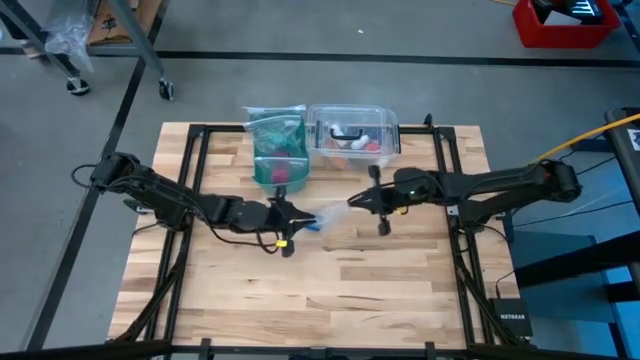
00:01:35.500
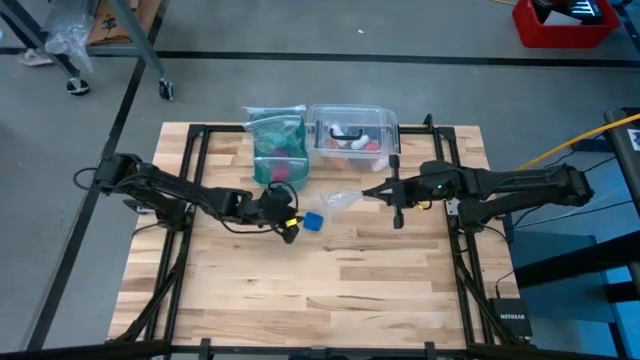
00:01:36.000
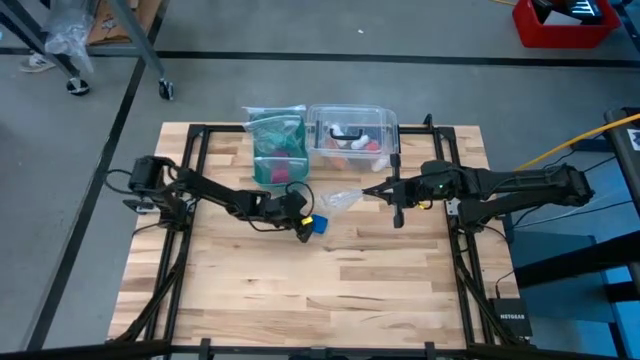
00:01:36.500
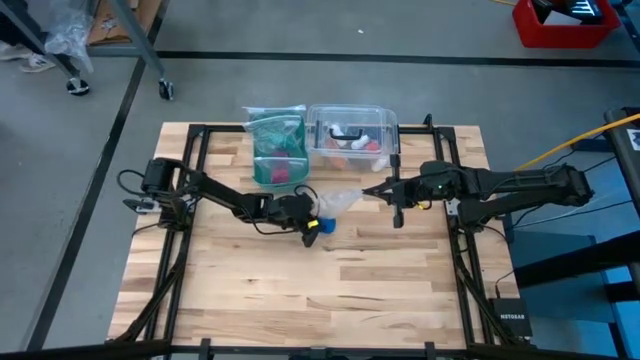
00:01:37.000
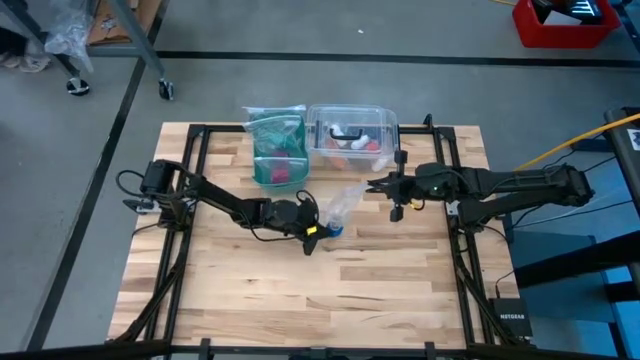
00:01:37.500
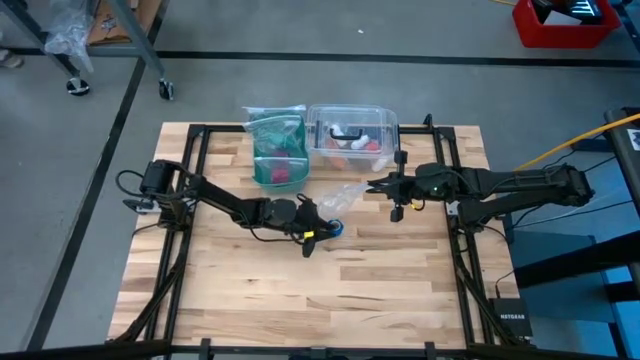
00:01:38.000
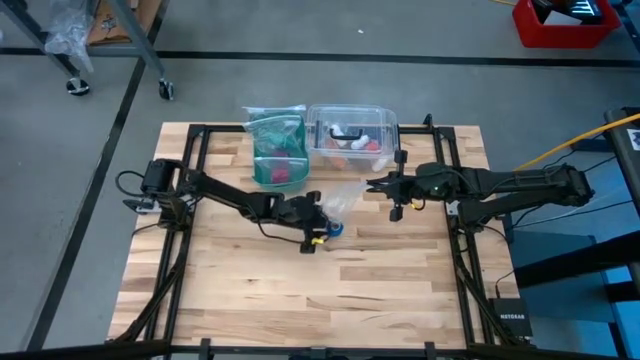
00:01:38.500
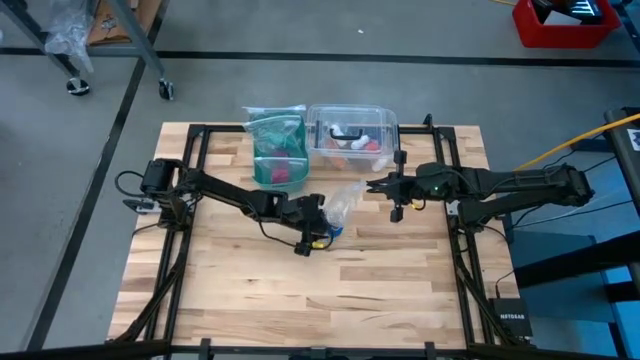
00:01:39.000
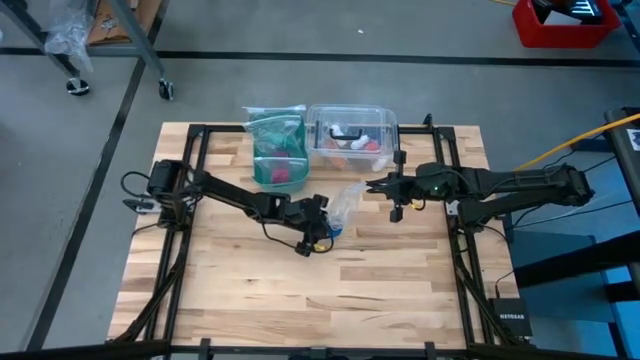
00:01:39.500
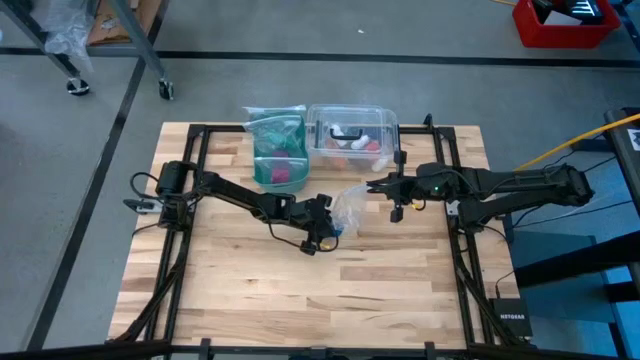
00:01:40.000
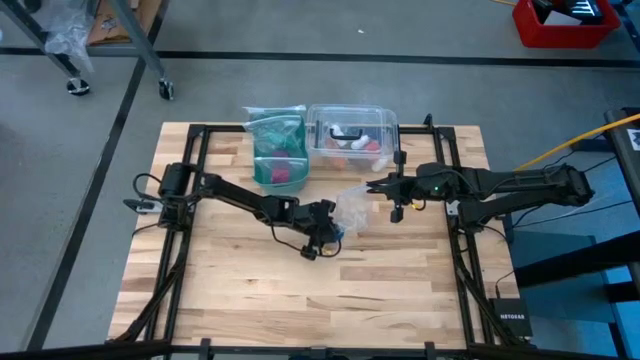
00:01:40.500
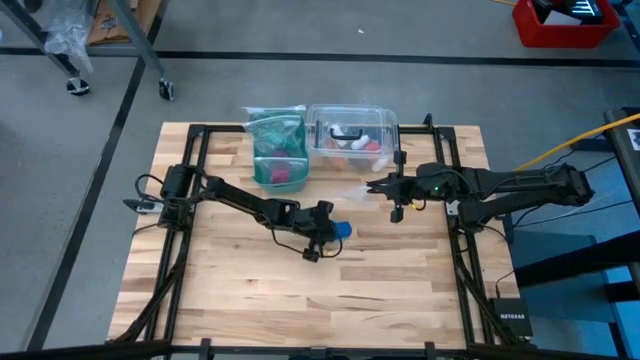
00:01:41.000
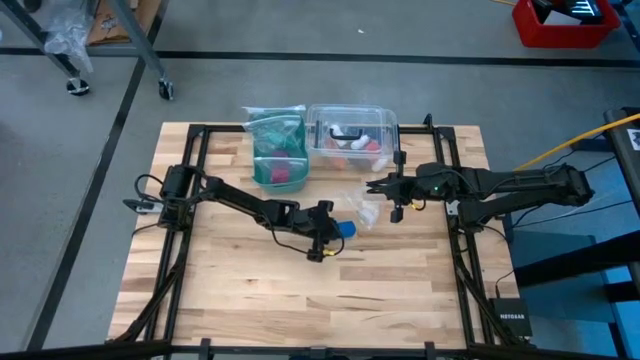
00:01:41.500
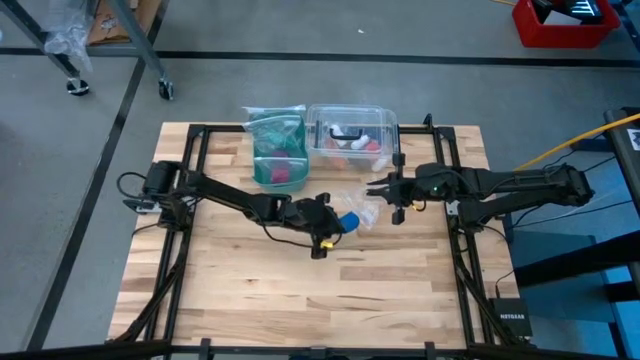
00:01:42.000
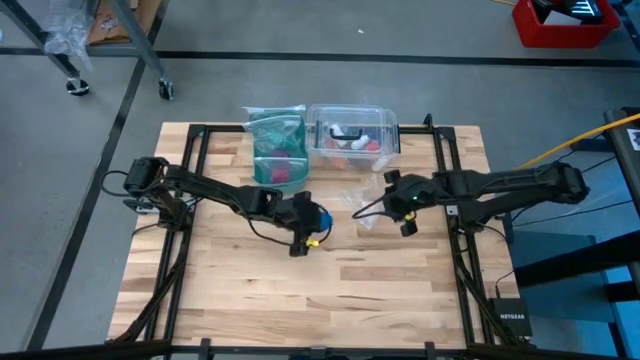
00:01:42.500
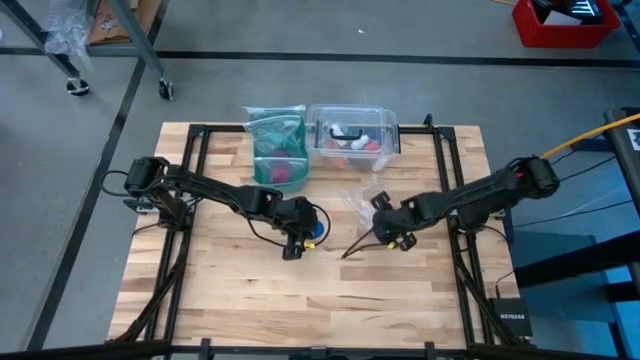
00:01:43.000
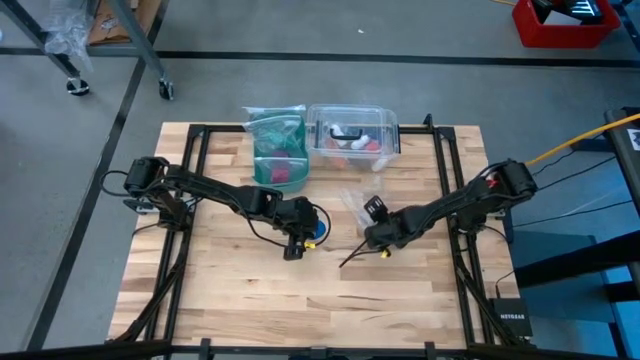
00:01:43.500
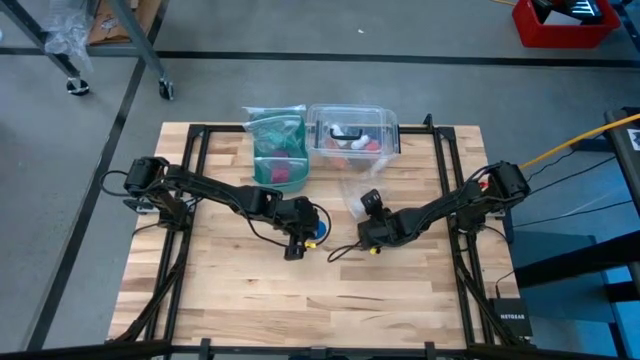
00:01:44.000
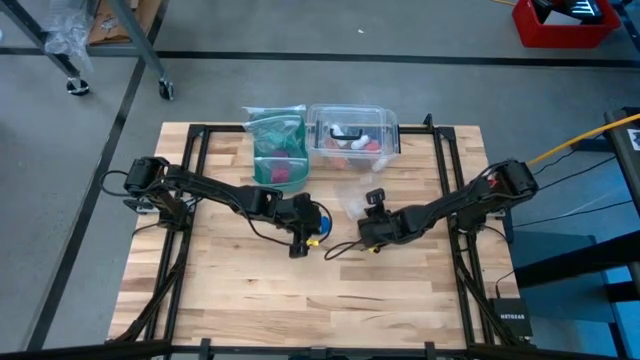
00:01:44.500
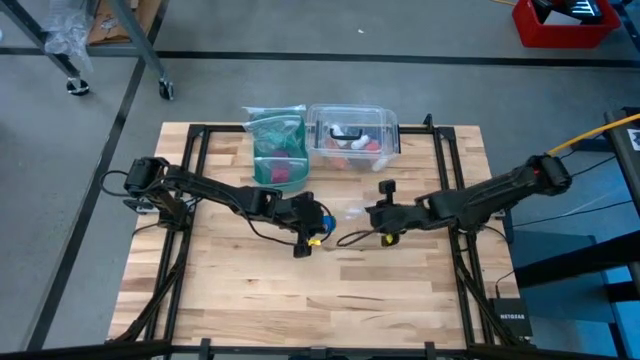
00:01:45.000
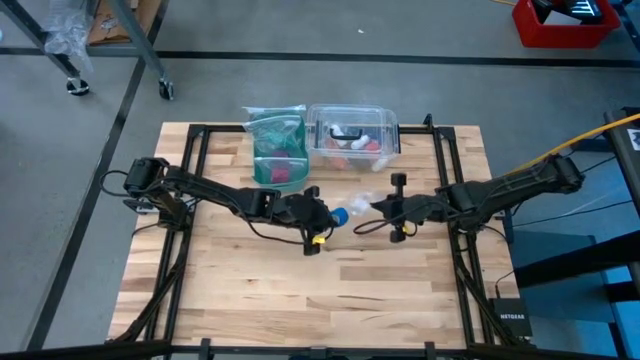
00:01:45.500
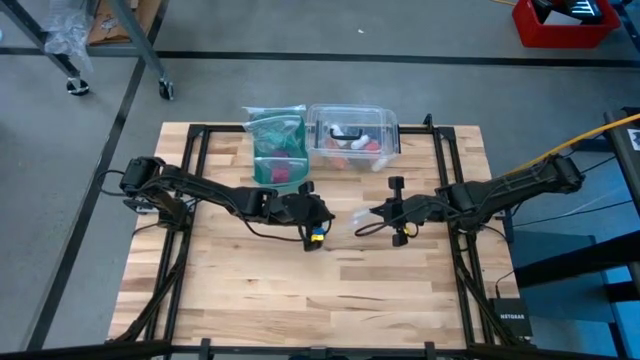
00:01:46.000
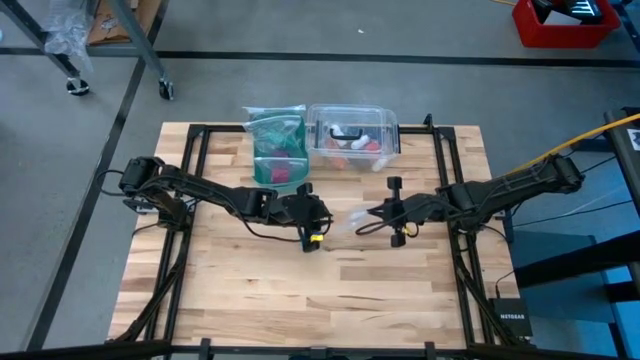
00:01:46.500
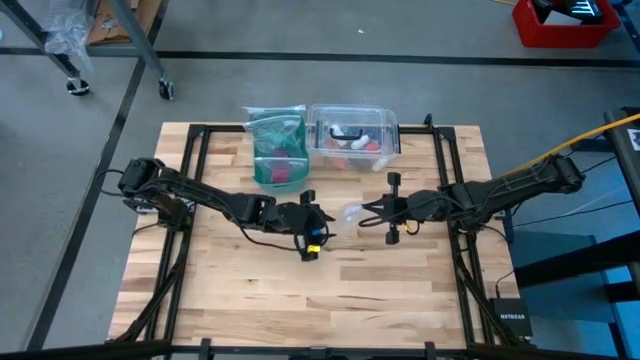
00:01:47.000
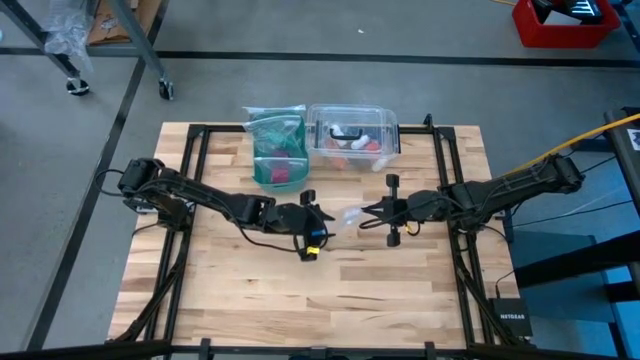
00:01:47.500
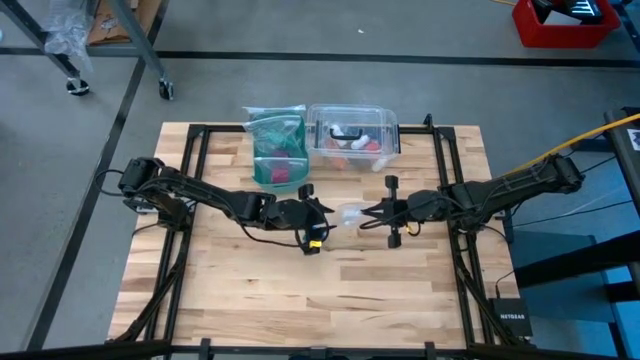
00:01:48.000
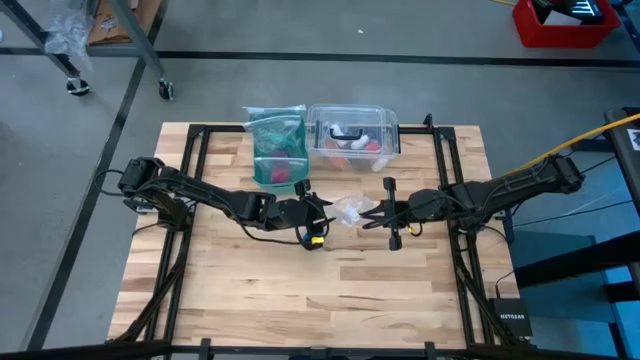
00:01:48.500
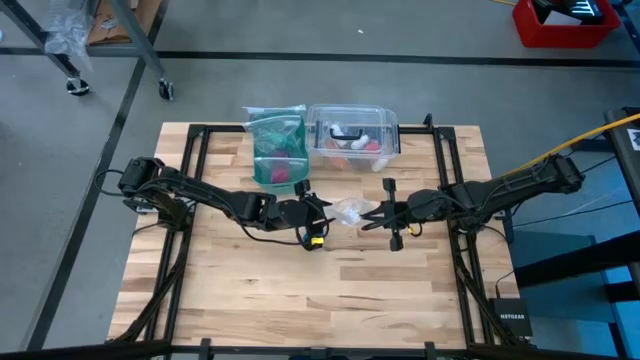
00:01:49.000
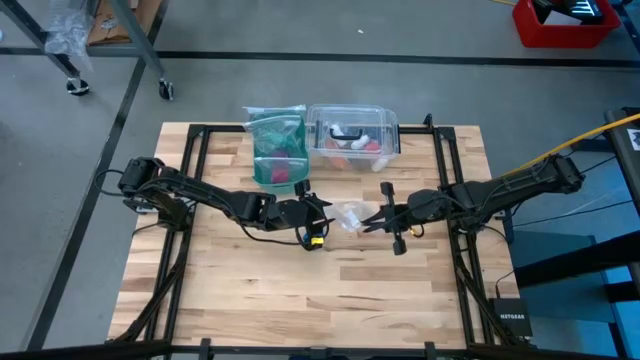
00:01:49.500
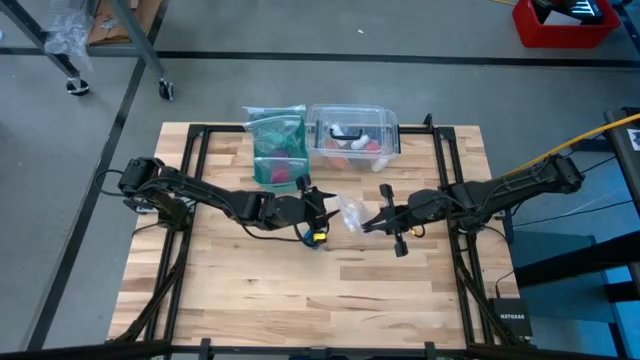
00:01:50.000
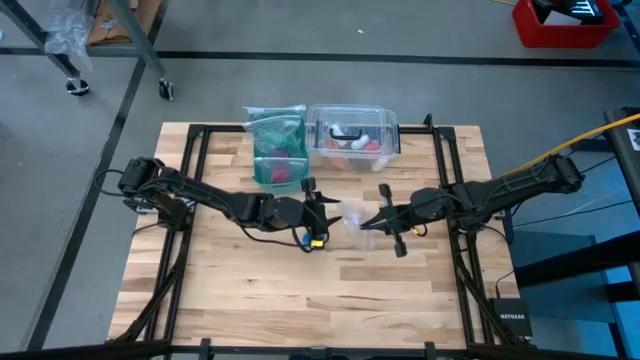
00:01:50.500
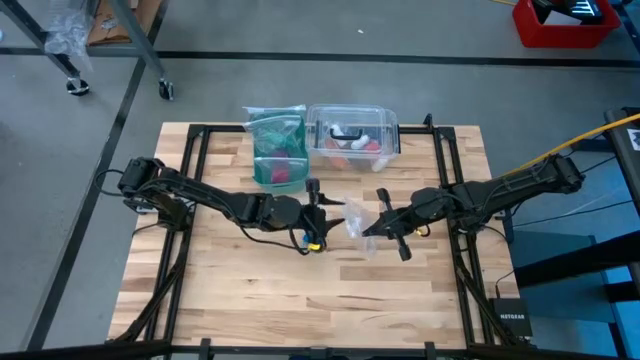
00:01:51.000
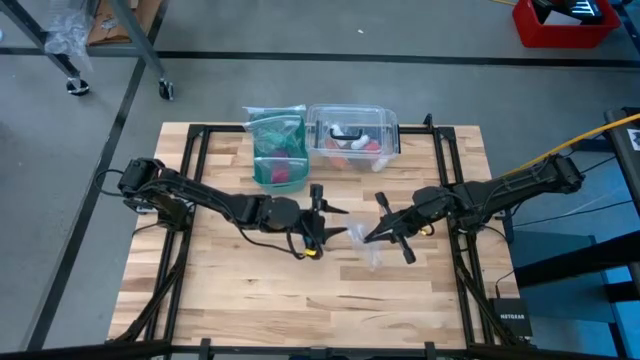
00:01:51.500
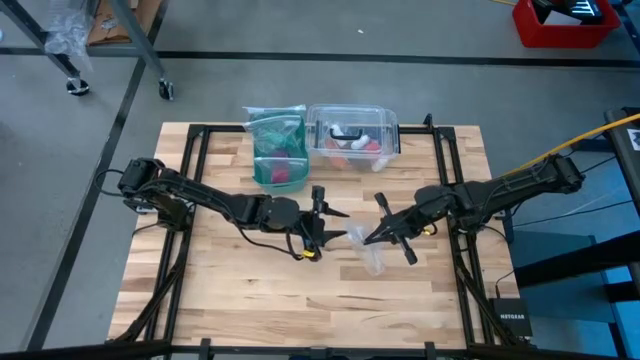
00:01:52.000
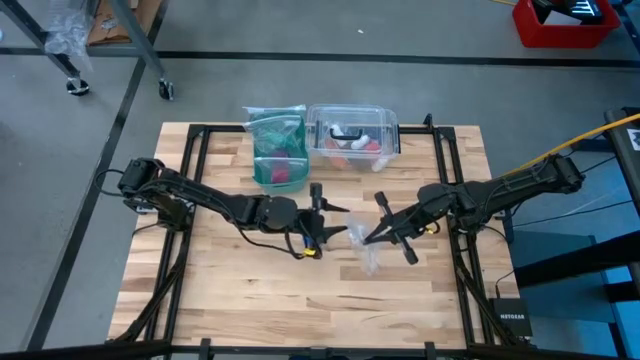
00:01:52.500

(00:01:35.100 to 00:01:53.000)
Task: Roll bandage
Put the blue bandage into the transparent zip bag

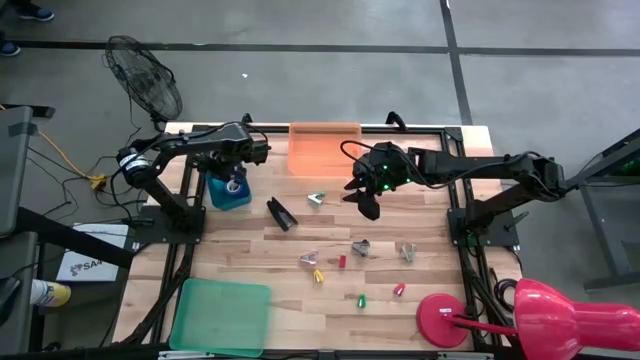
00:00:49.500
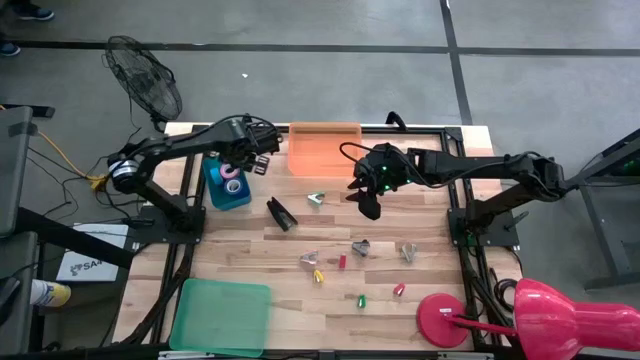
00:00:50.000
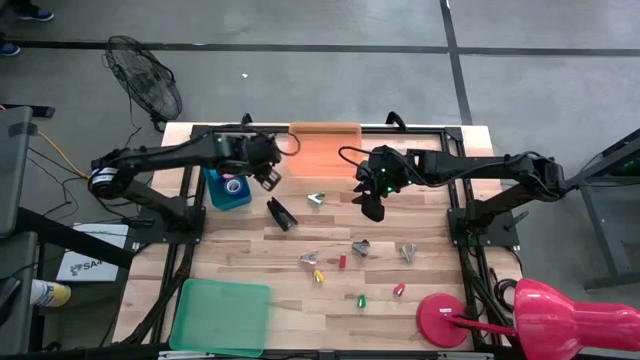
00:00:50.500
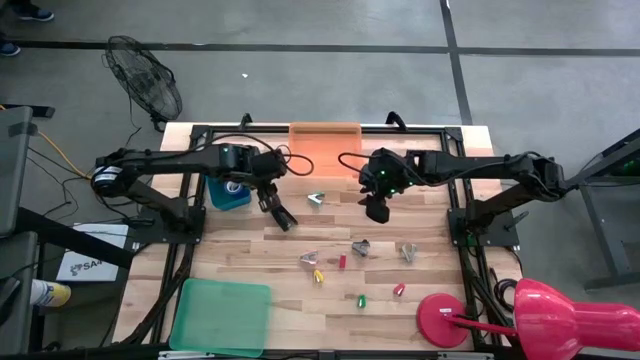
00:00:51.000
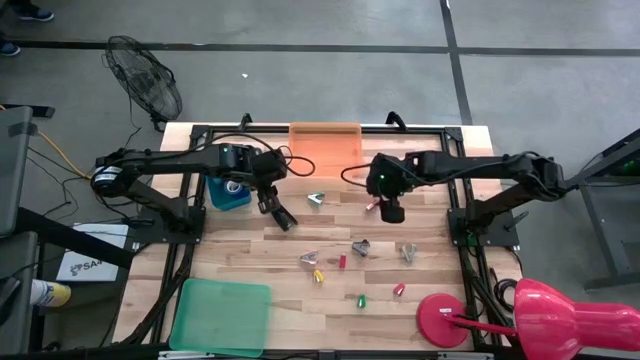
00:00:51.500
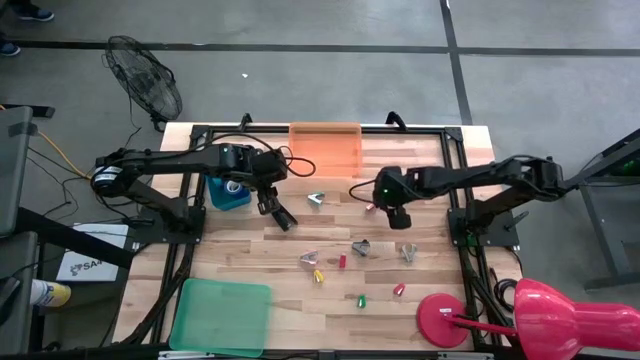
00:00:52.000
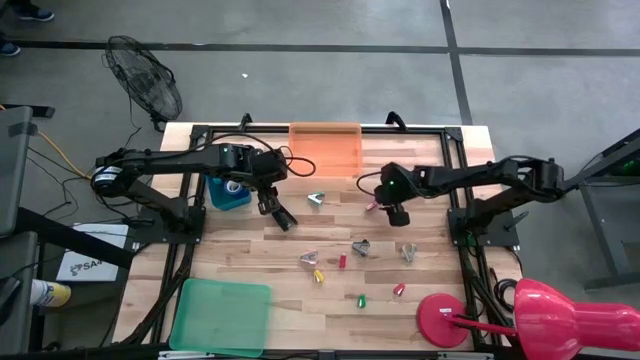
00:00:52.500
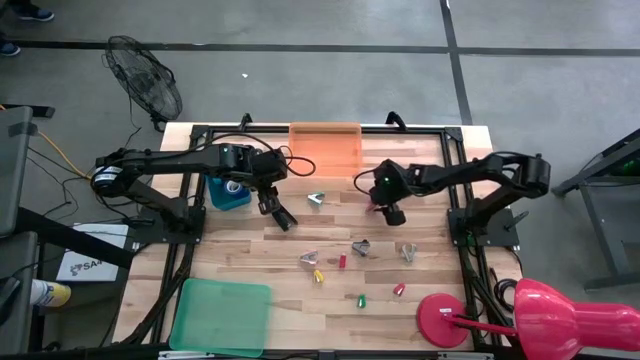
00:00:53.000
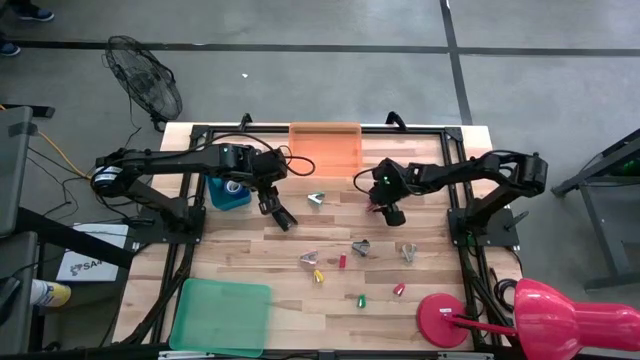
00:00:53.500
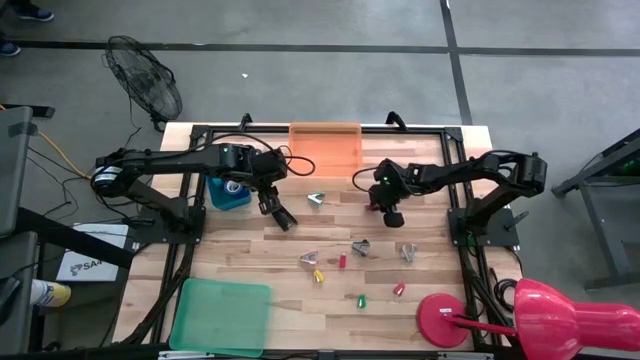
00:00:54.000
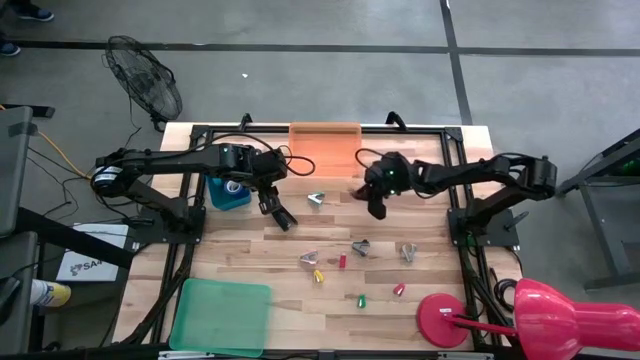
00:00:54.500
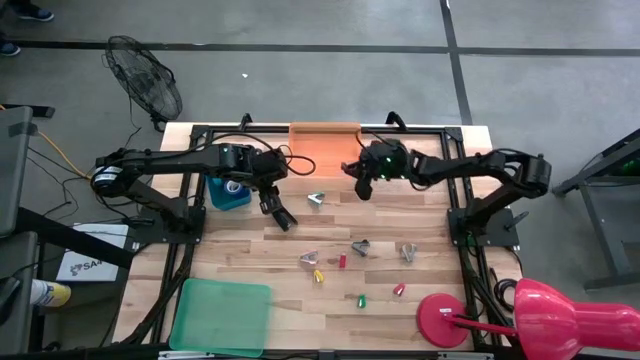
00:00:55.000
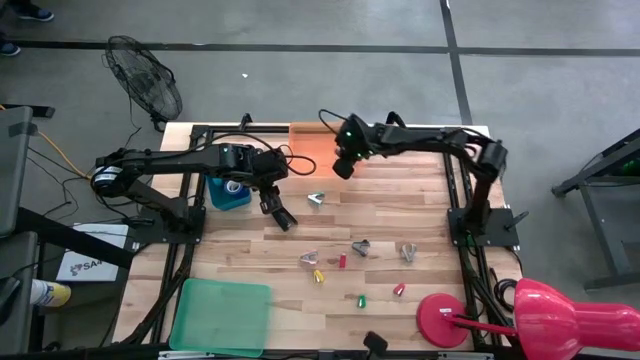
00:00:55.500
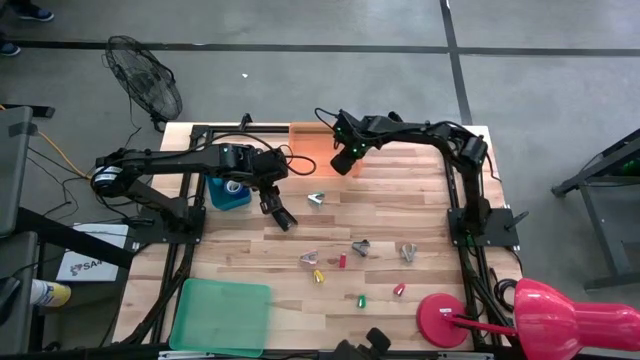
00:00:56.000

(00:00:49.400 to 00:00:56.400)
Task: Pick and place Stapler, Stapler remover, tape
Put the red stapler into the orange bin
